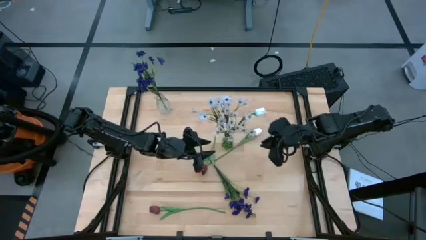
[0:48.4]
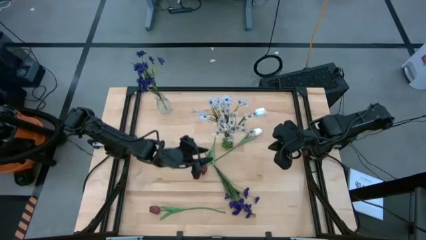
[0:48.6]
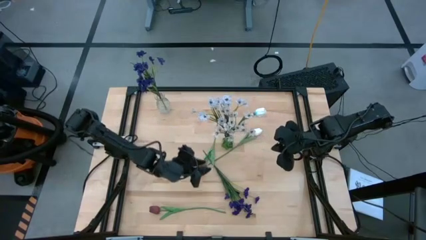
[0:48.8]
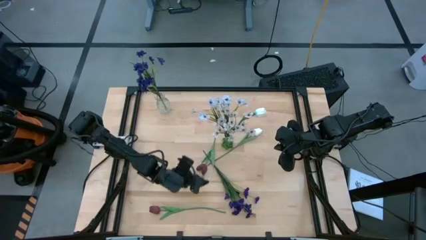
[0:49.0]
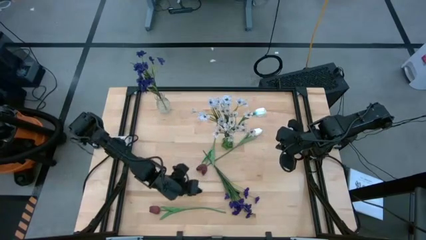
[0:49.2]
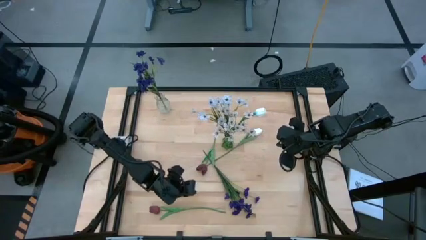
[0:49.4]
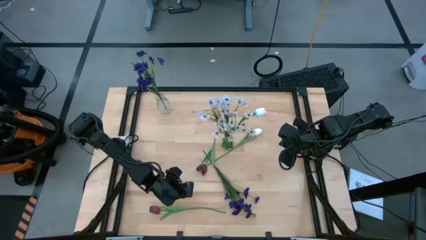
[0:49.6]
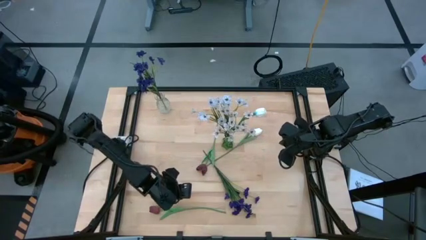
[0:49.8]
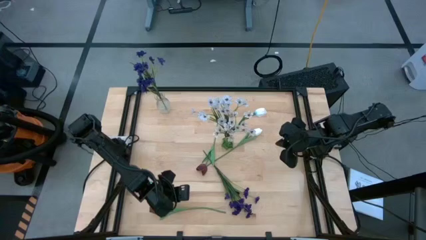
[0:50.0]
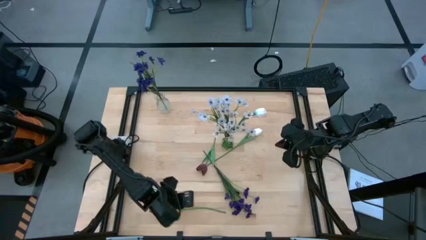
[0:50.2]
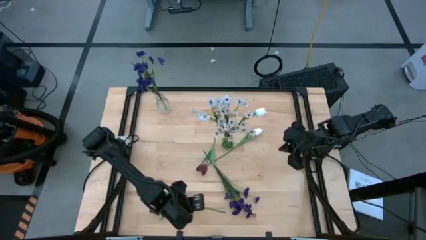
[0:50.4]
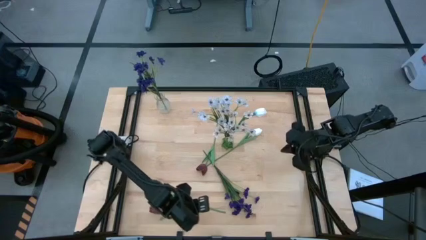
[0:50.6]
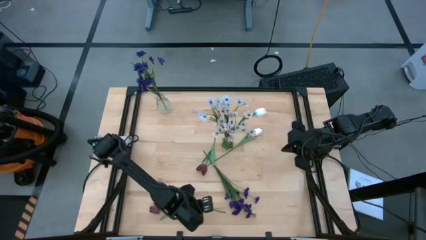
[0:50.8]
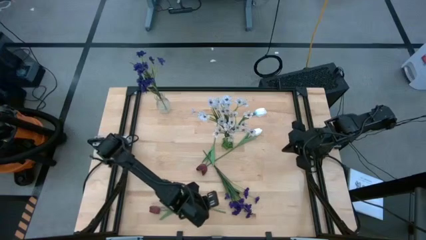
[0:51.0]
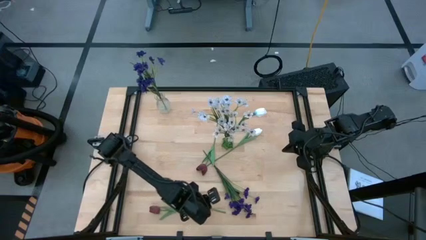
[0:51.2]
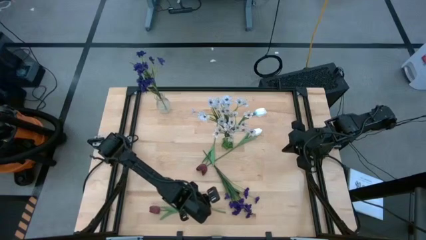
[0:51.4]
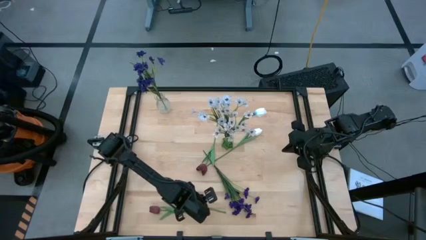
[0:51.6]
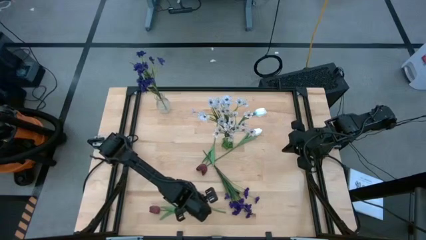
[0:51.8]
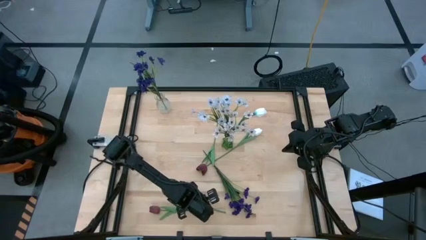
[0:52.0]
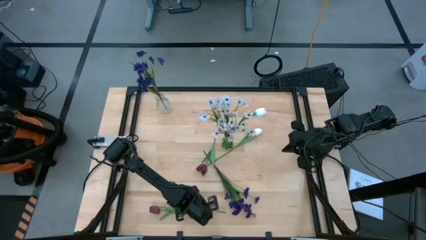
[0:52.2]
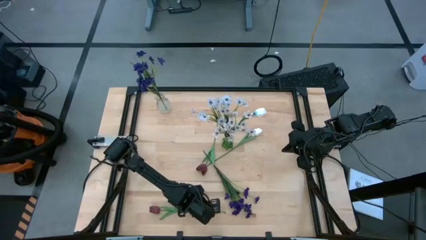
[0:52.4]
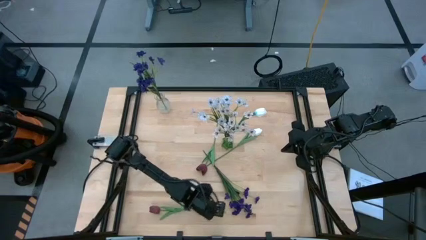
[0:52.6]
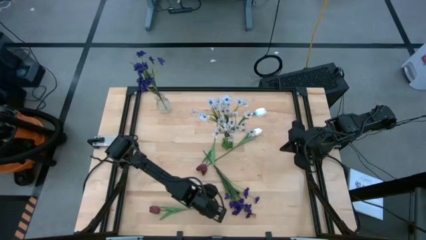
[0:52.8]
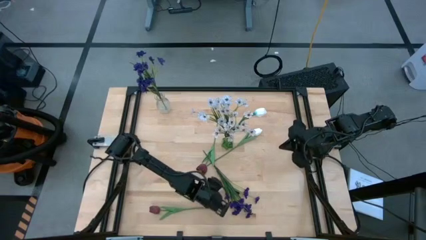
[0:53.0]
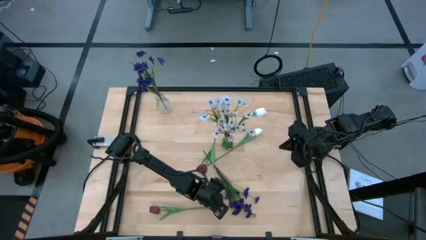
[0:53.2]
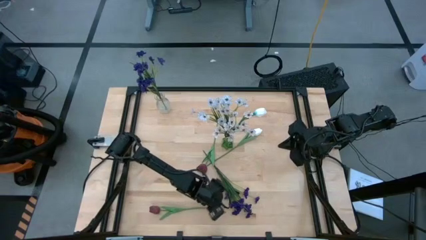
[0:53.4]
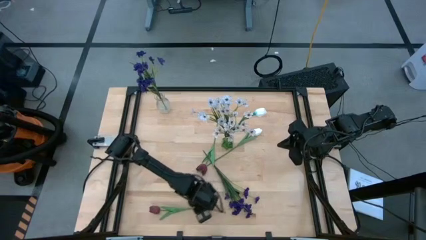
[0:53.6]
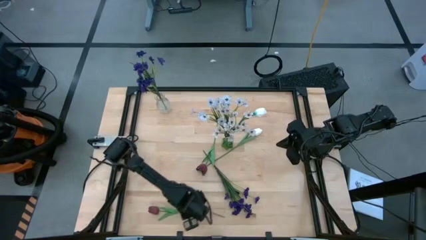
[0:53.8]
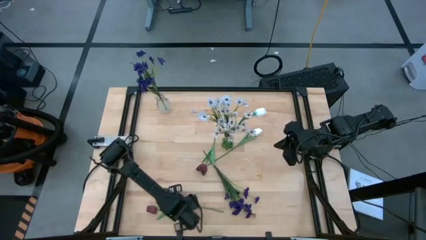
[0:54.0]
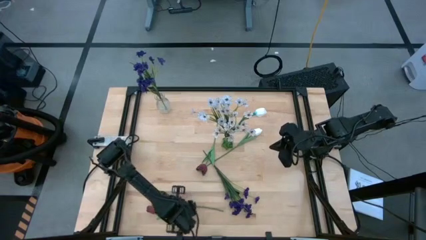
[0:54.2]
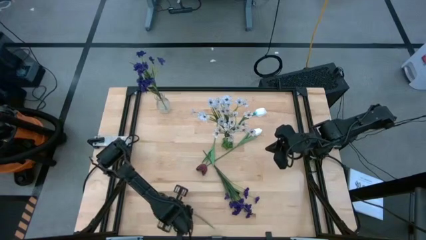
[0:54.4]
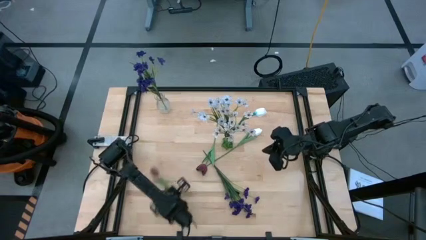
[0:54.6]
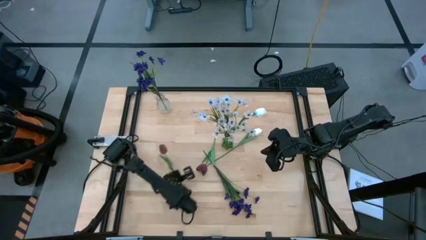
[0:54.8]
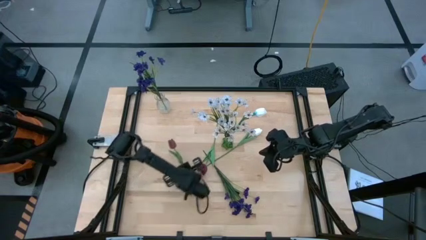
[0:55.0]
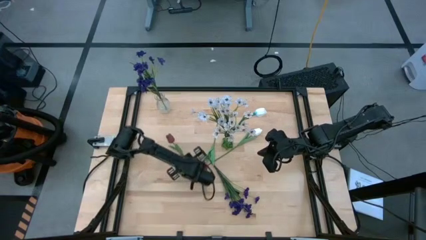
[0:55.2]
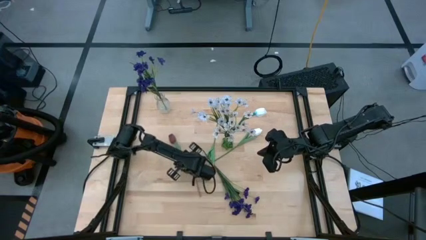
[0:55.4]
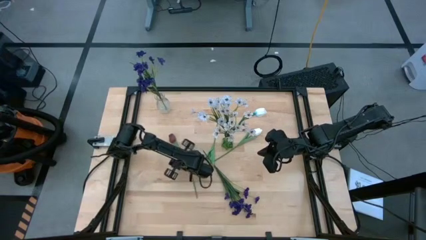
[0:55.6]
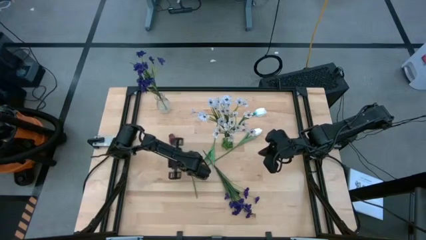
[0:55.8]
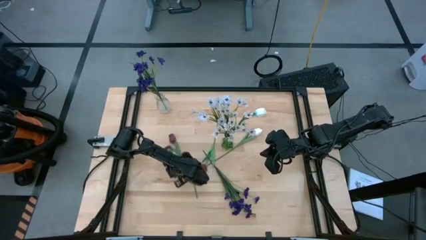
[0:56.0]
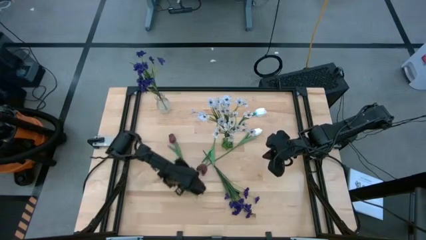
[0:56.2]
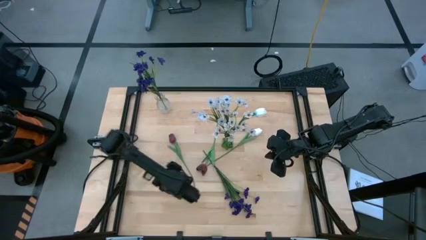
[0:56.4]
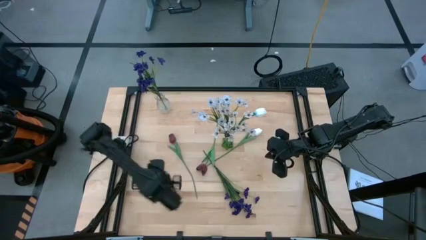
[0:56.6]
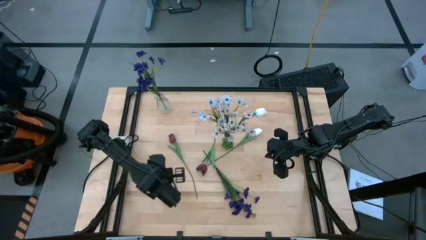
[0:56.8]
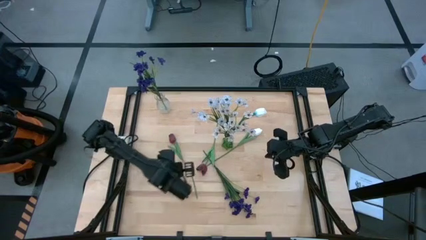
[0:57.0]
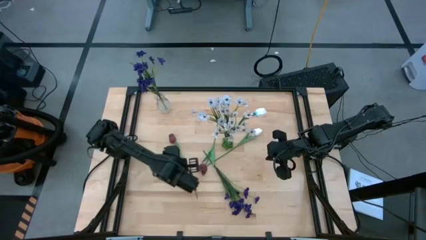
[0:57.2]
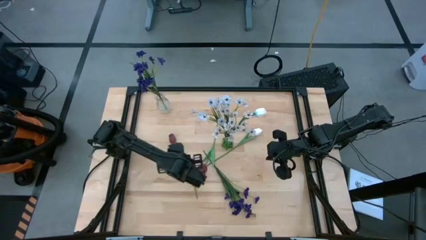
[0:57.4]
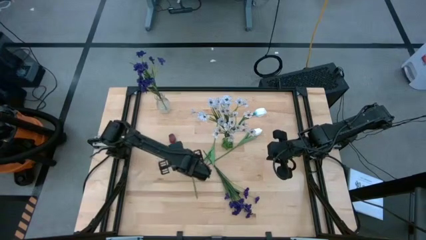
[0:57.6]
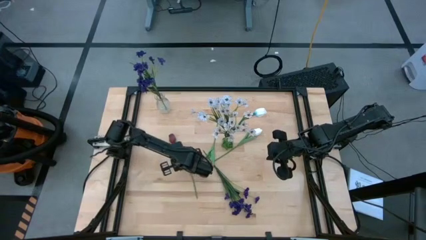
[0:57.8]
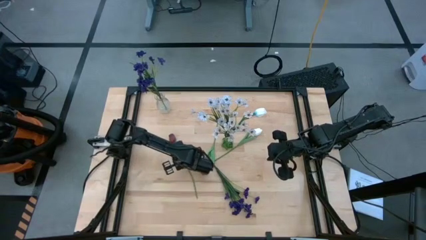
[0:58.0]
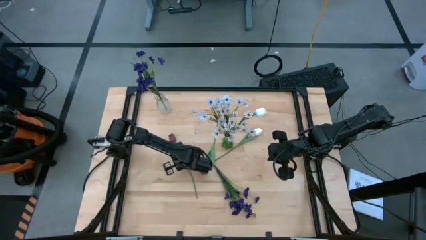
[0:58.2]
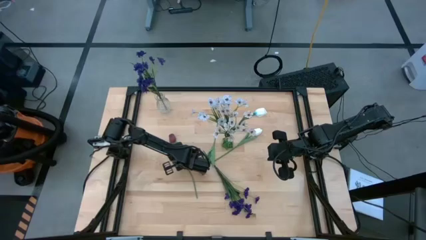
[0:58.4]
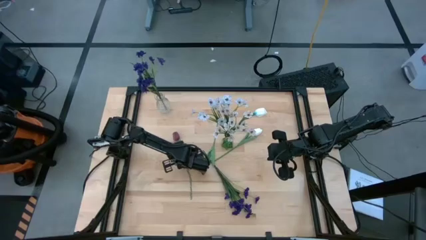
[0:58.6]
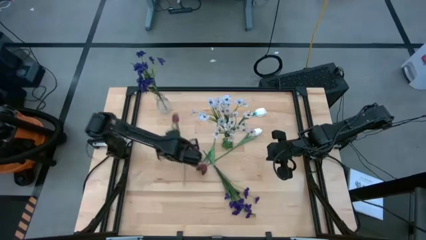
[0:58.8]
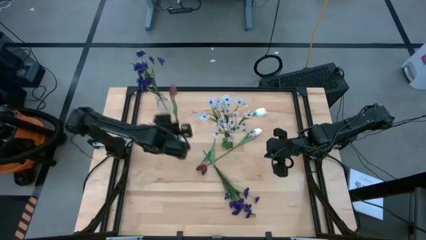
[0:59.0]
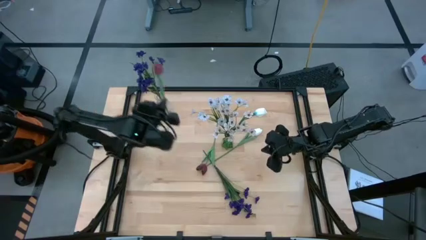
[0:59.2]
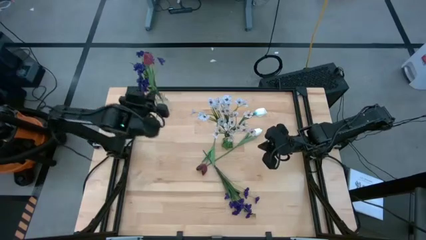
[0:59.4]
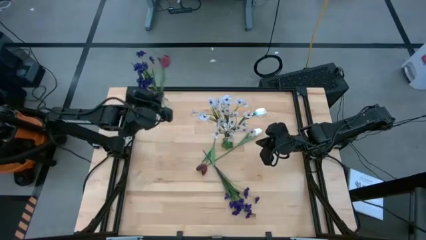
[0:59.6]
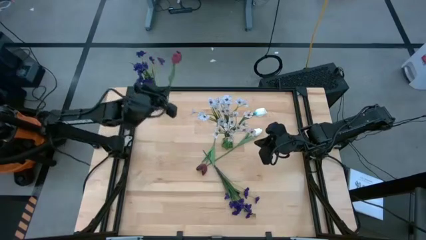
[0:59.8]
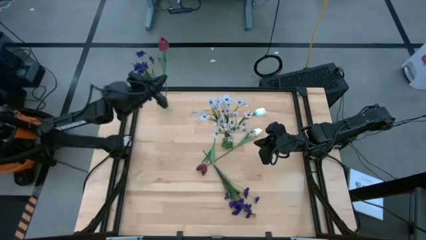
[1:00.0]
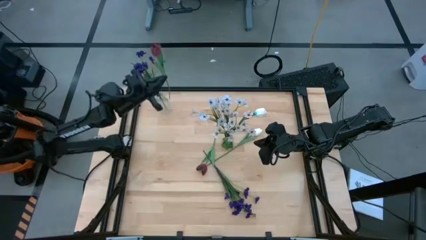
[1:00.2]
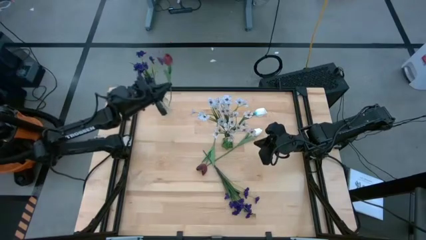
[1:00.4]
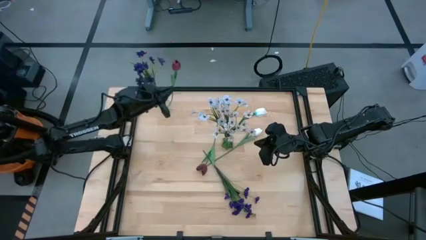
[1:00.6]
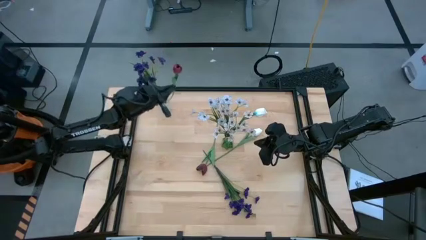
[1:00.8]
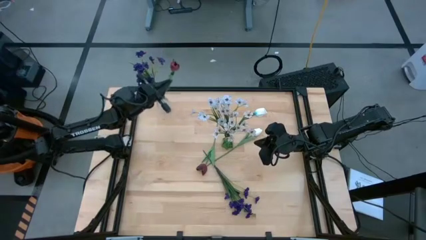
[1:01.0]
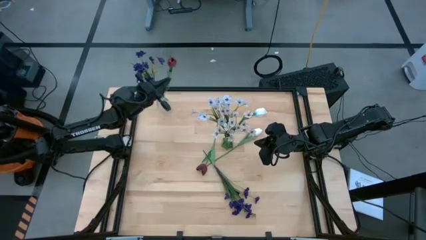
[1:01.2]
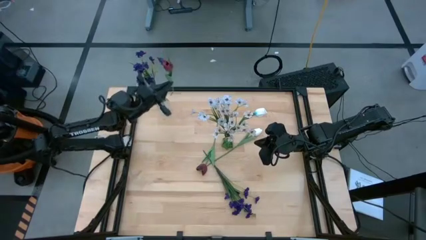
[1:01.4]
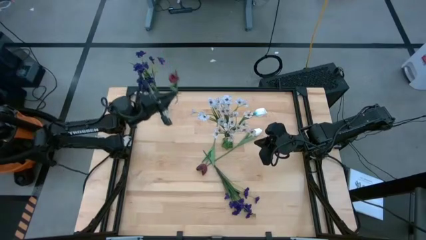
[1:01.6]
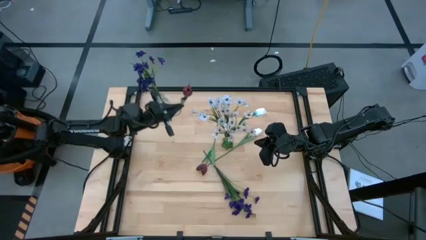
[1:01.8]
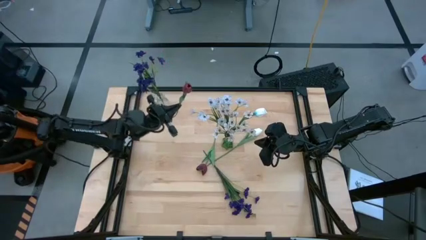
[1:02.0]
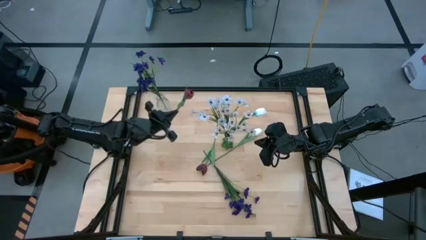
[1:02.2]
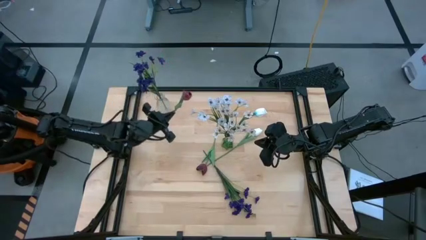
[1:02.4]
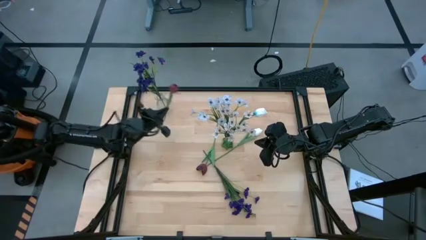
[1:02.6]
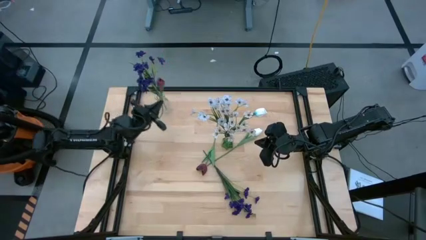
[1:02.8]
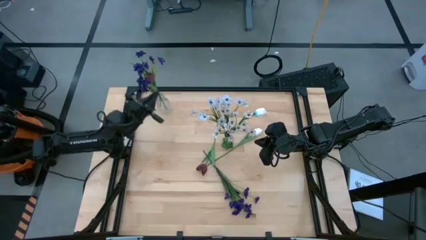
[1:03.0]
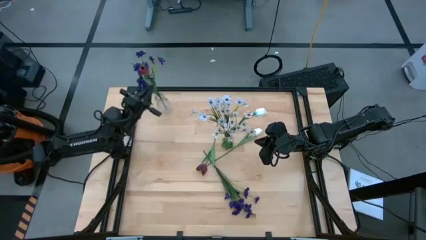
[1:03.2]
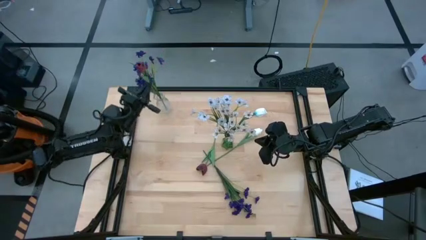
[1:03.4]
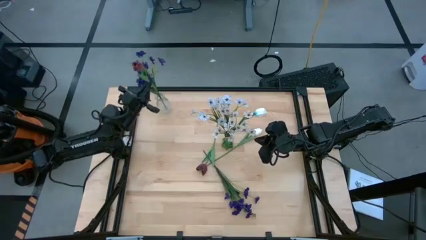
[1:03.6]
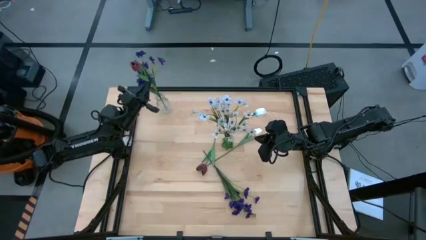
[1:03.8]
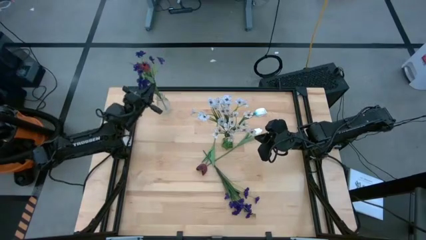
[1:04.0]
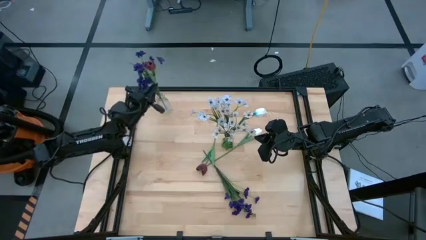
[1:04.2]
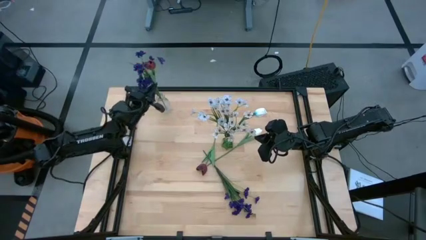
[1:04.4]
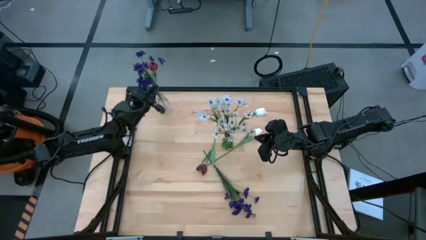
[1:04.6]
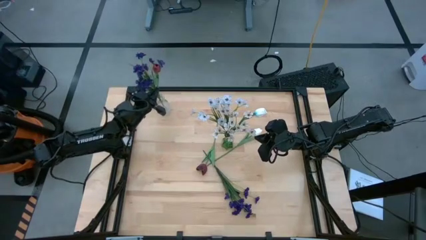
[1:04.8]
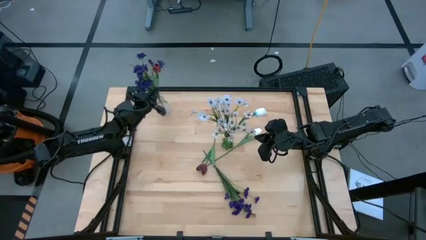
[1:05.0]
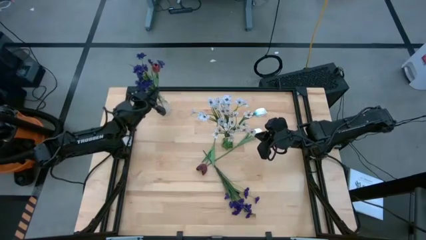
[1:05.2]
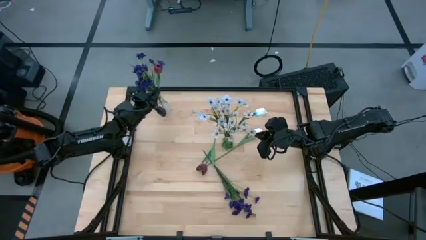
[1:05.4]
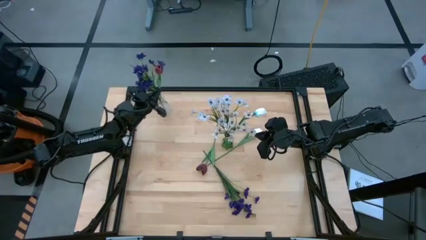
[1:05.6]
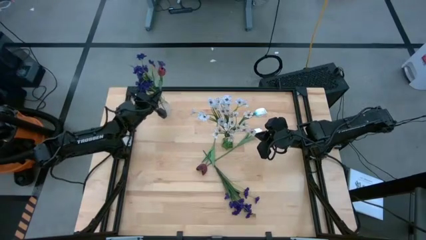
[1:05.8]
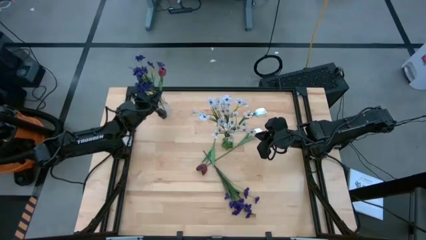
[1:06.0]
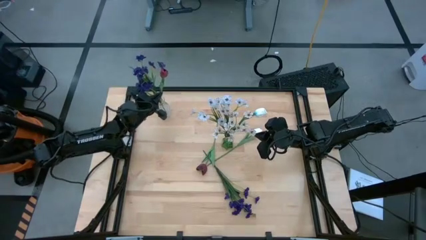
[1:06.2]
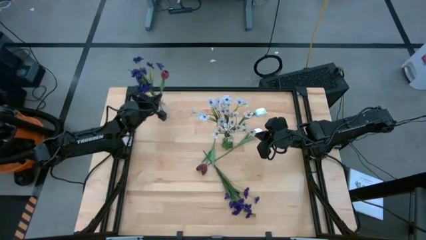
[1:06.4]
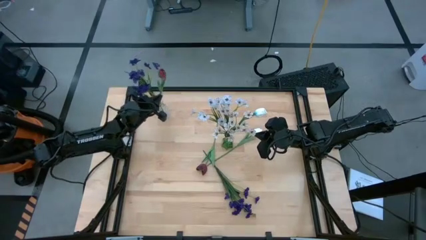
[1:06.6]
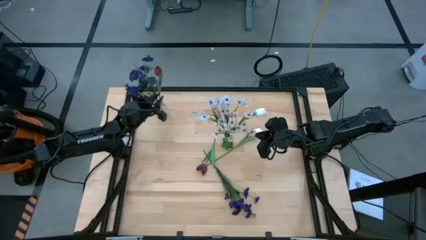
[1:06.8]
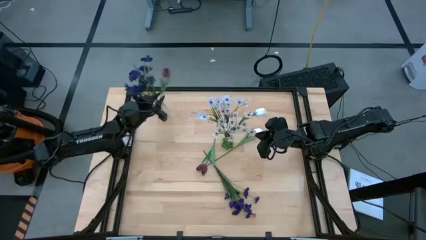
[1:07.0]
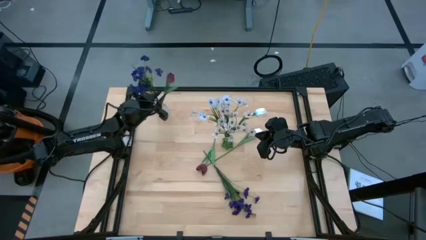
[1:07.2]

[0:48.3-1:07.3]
Task: Sort flowers into vase by color
Put the bottom dark red flower into the transparent vase
